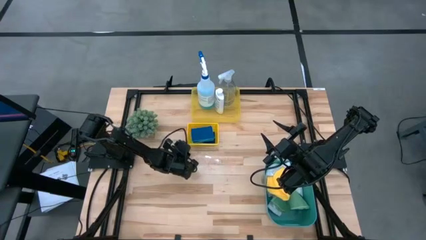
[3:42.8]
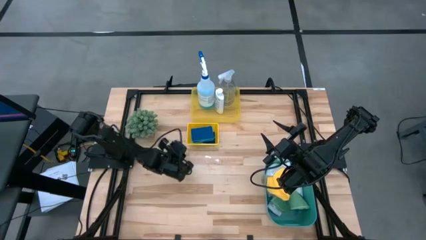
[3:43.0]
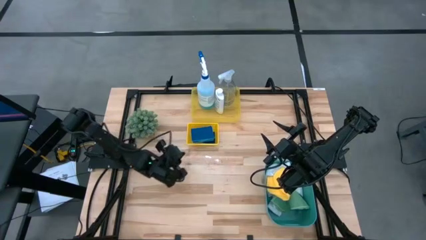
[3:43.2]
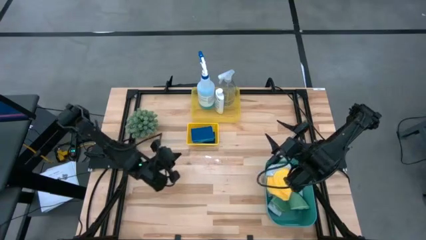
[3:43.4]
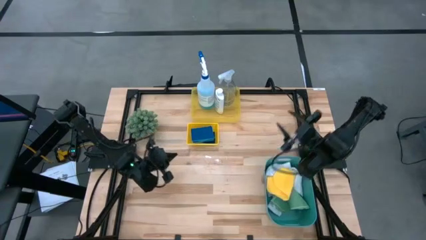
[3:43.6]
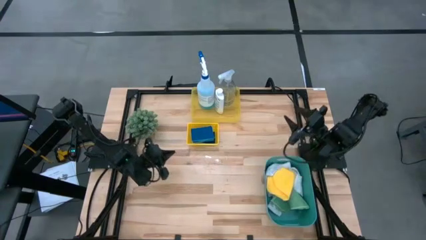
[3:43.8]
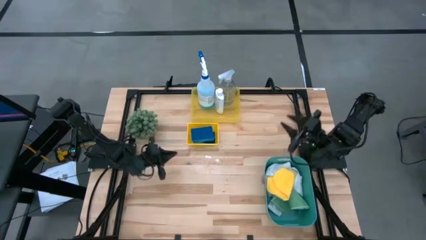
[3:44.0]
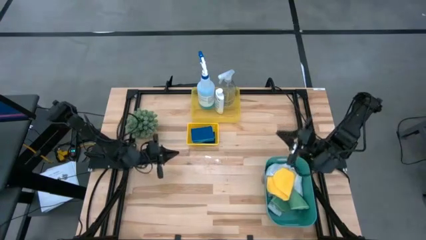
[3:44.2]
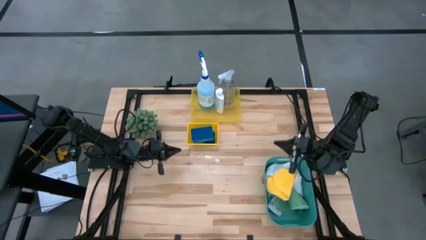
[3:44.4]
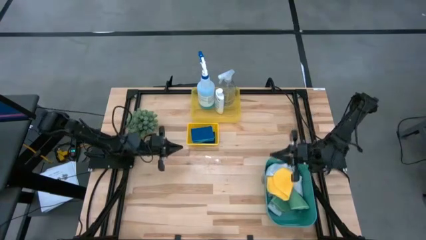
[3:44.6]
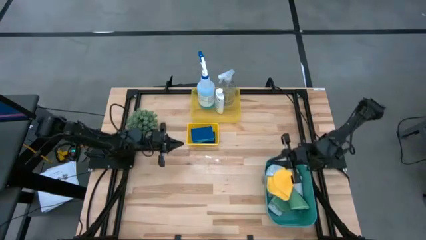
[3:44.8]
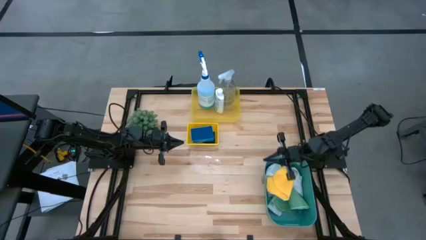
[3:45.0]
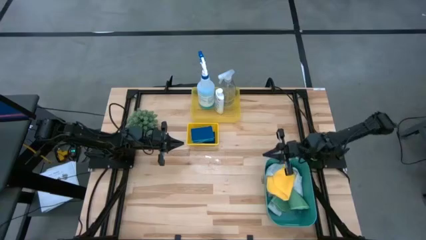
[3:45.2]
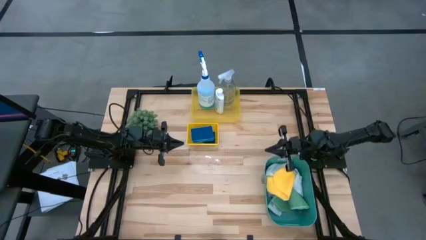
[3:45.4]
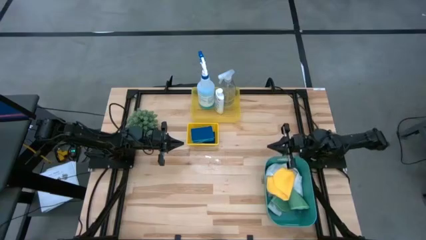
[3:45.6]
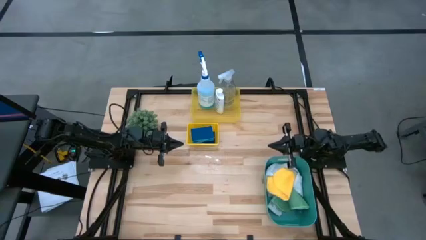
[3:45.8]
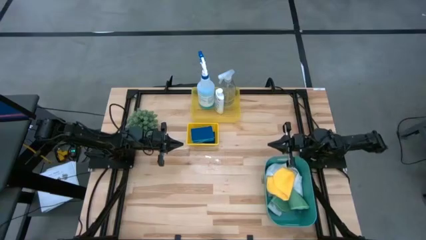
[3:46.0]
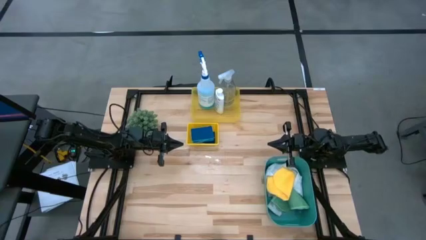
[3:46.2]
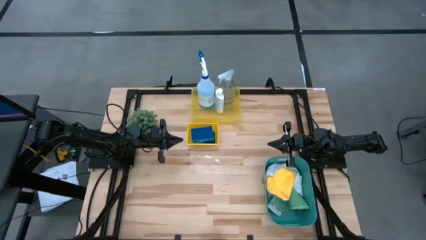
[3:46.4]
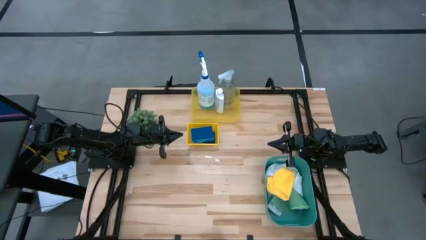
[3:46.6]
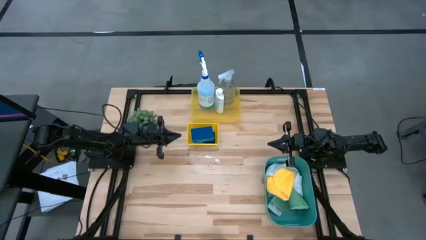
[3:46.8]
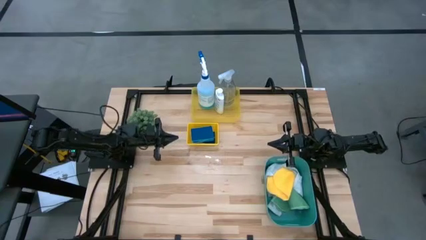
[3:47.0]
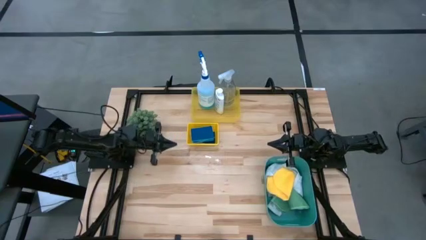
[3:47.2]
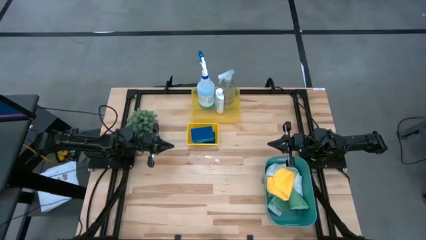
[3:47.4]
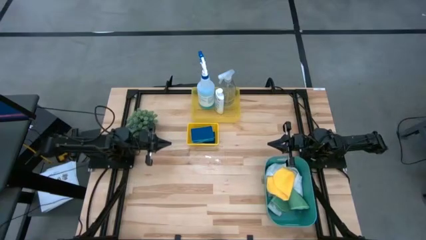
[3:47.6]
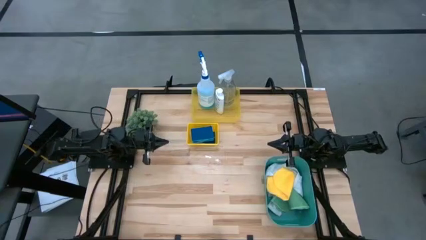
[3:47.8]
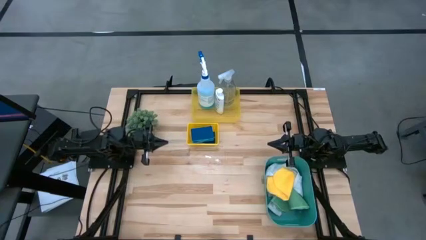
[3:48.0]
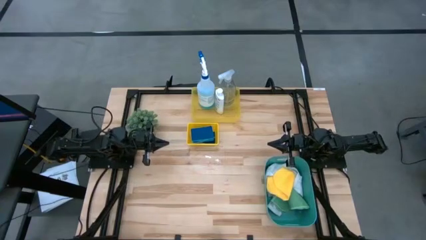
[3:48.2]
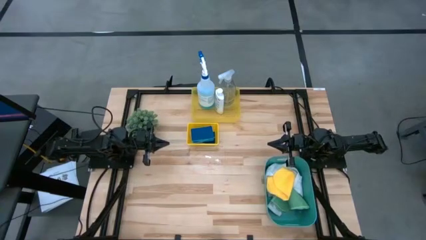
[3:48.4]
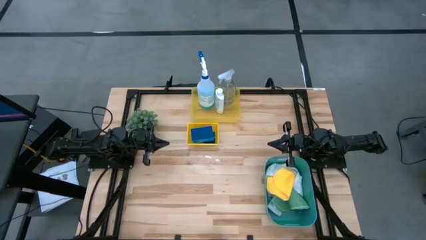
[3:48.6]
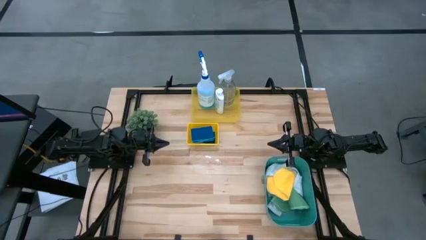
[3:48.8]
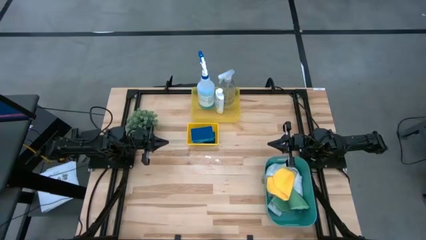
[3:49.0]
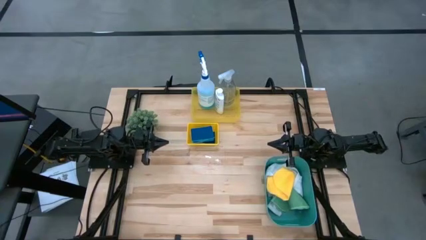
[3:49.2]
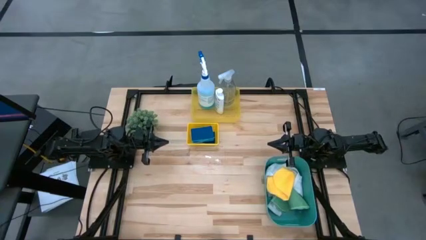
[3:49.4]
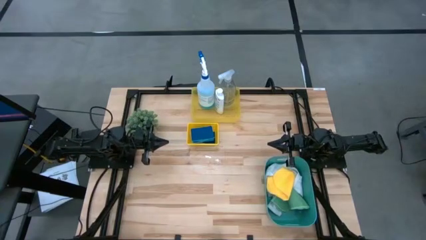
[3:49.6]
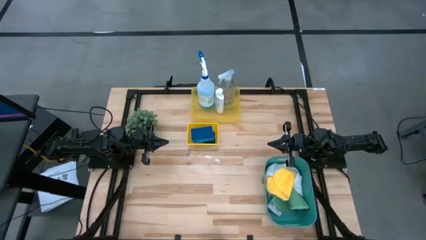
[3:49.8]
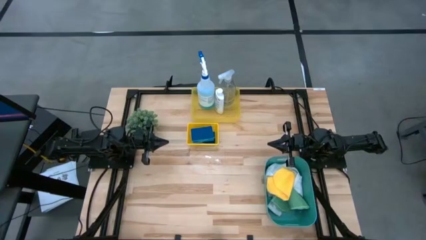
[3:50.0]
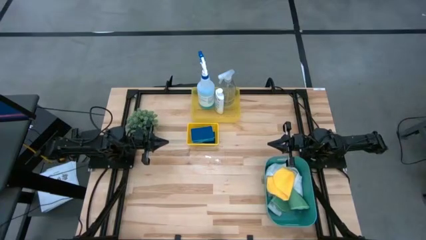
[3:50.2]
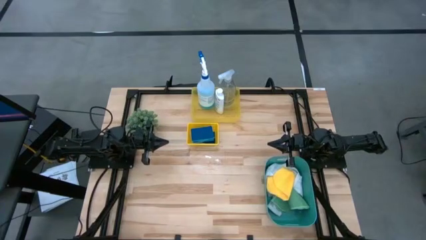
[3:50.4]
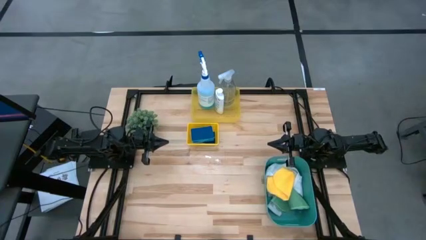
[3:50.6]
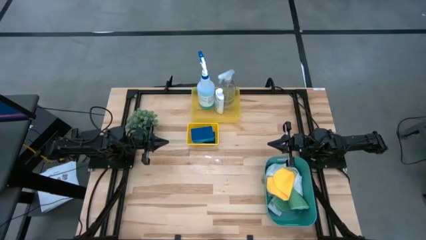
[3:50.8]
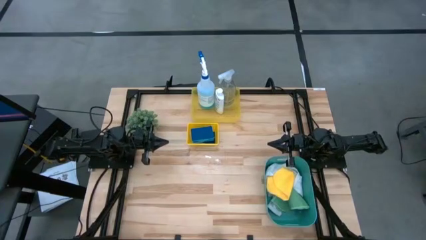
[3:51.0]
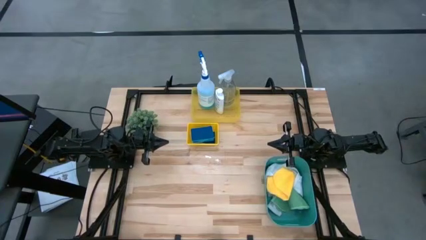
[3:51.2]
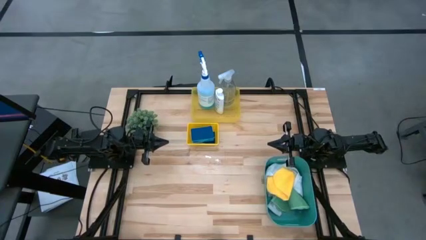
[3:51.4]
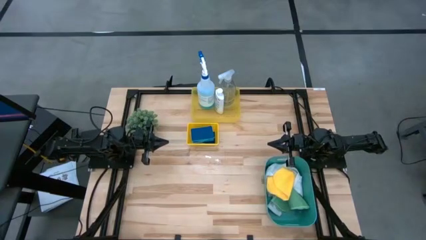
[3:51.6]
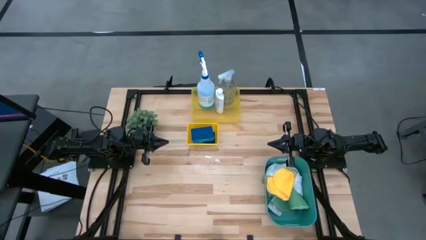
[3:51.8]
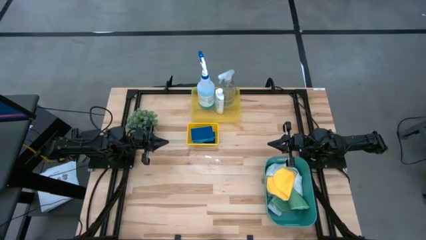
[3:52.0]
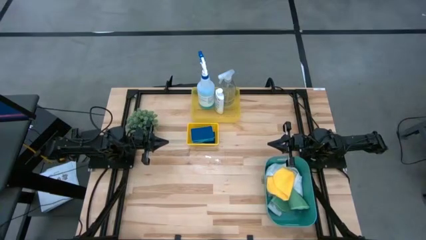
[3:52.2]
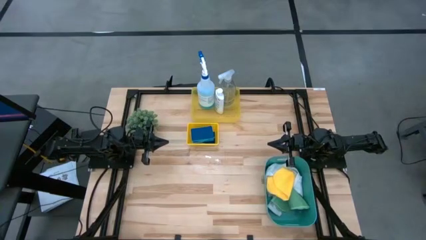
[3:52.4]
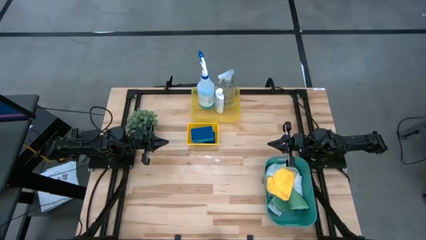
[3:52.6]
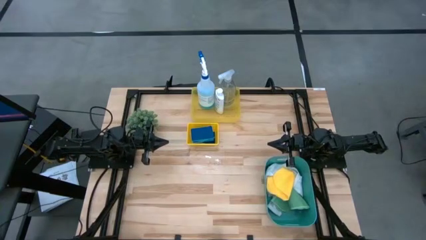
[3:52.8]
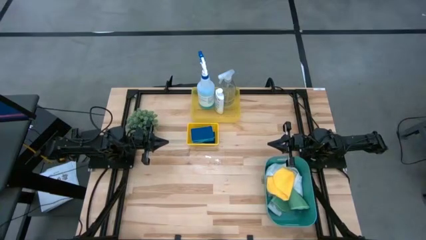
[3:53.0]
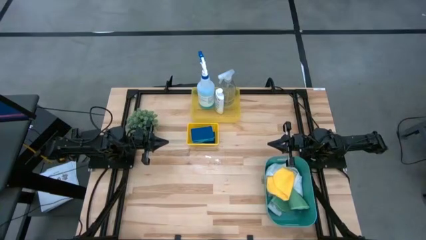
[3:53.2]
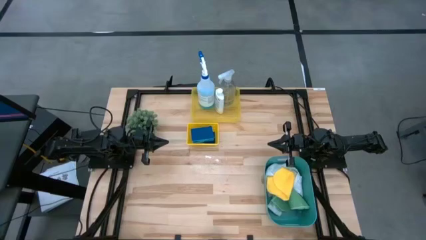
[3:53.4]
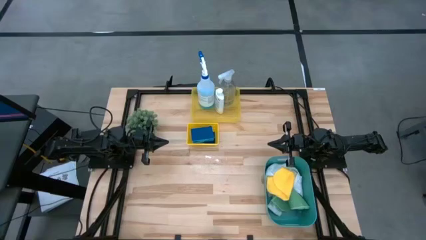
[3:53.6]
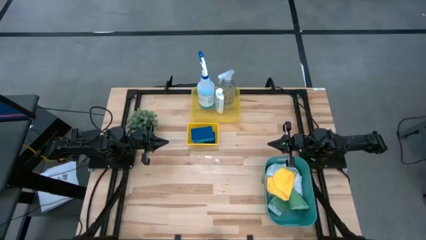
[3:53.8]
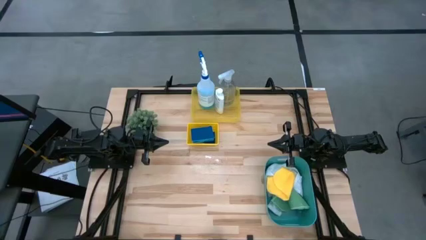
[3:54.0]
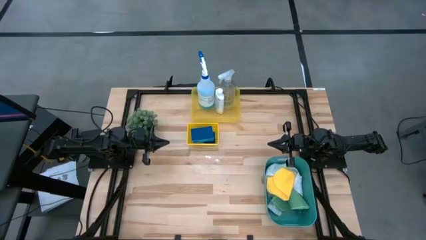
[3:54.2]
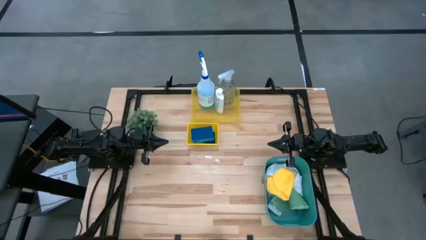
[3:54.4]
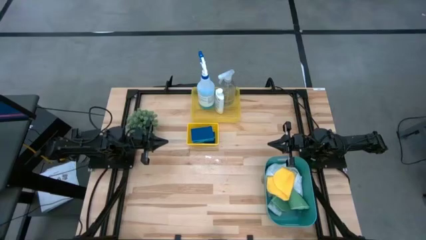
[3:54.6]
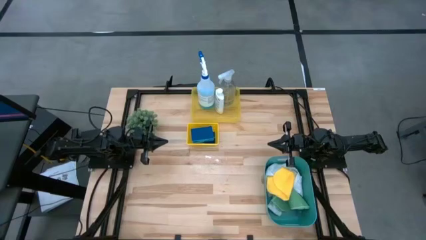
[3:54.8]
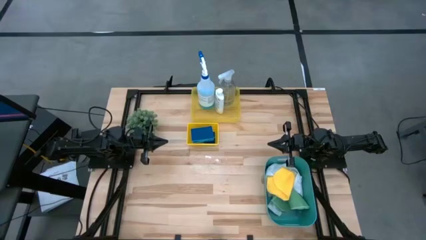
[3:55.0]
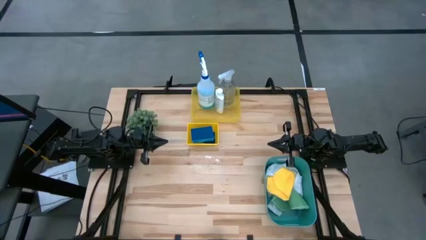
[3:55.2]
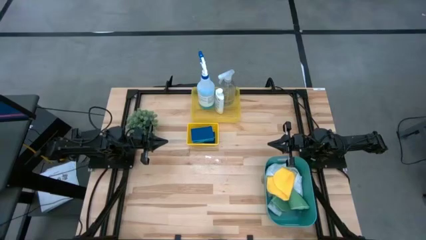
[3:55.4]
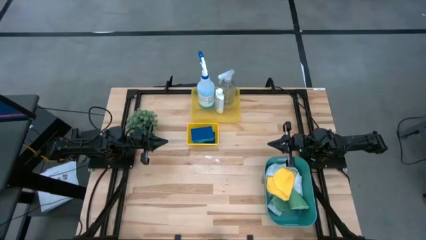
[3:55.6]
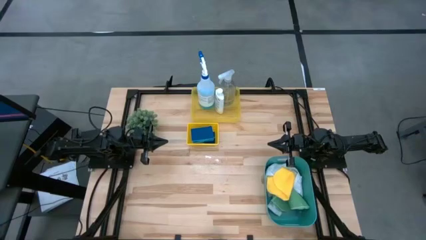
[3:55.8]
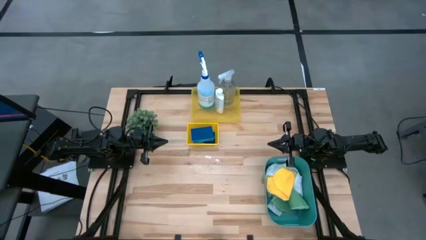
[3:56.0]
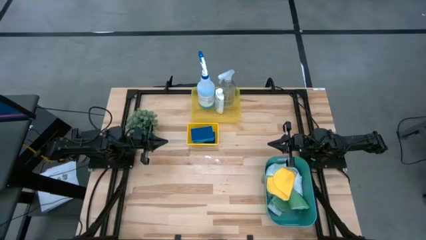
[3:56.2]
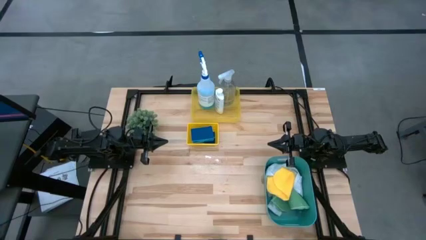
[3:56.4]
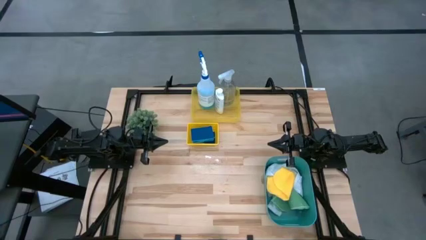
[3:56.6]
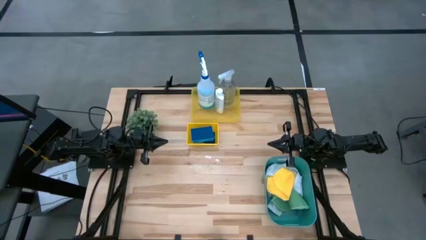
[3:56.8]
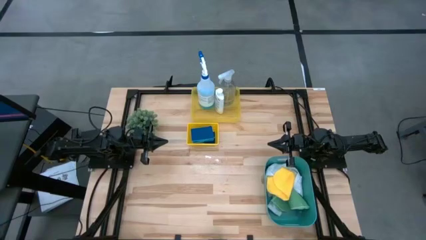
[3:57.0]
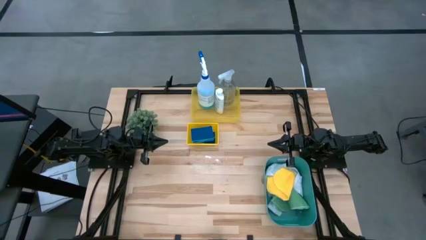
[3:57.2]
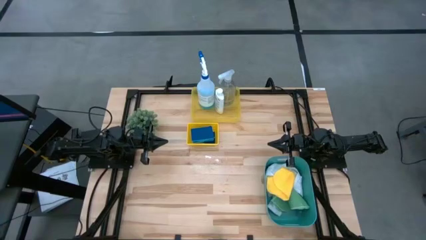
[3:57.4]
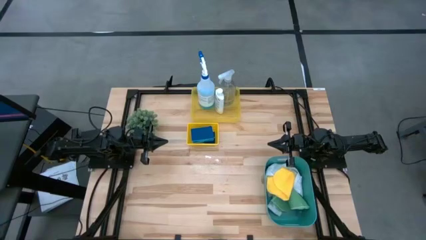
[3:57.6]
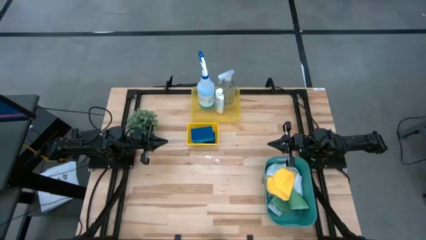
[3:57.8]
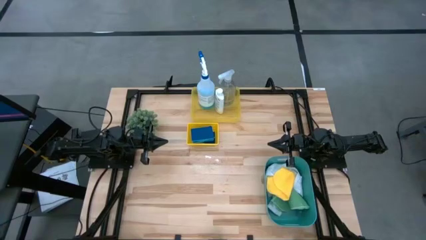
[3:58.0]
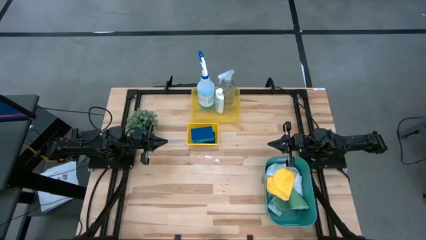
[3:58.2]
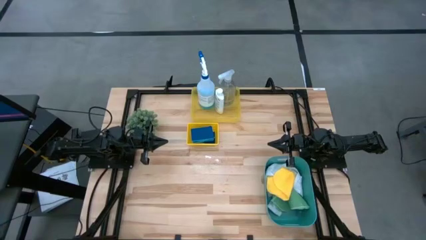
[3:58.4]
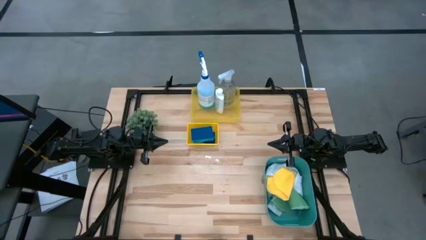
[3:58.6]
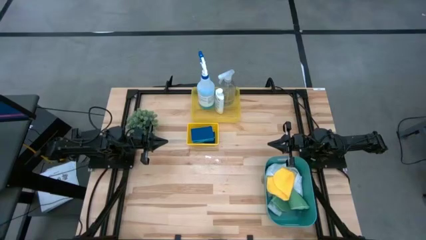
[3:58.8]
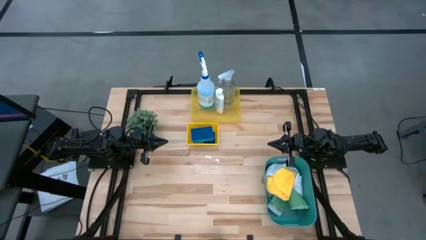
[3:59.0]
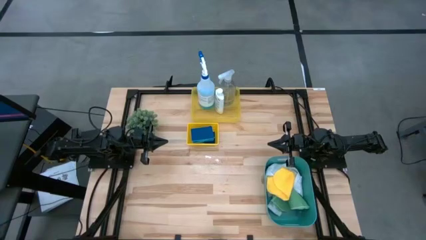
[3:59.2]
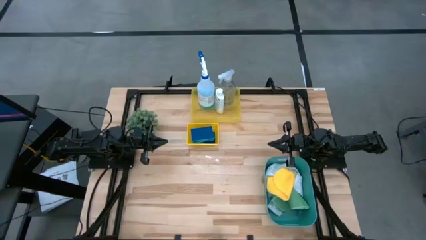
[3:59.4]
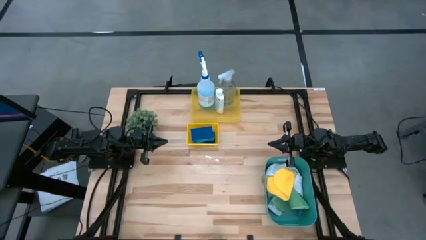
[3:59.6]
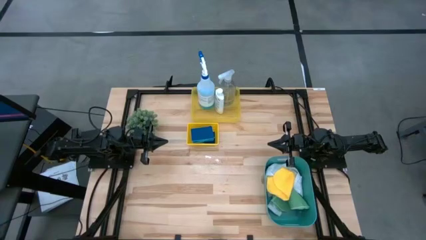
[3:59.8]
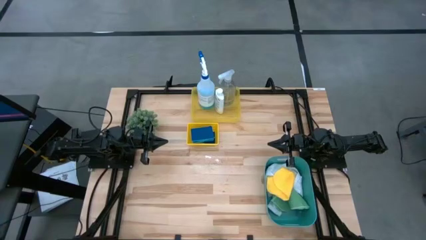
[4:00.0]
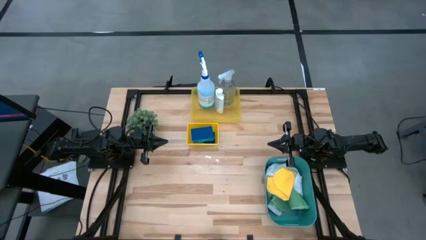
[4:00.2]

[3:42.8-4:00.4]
Task: Pick & Place Kitchen Items
Return to Home Position
